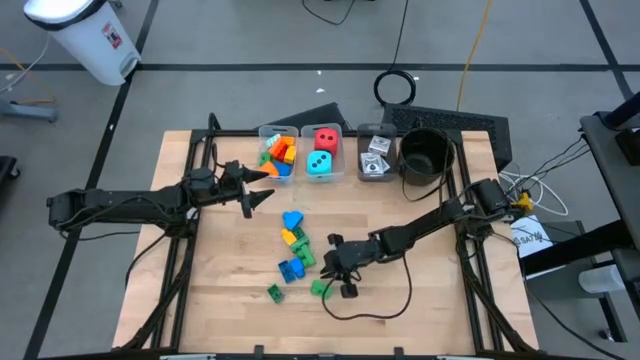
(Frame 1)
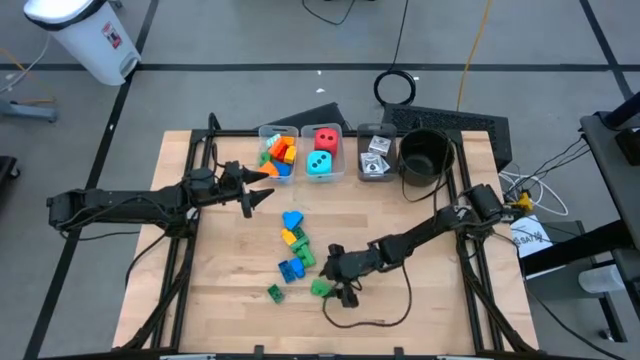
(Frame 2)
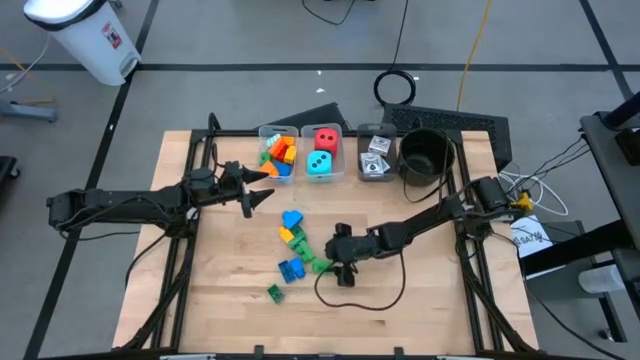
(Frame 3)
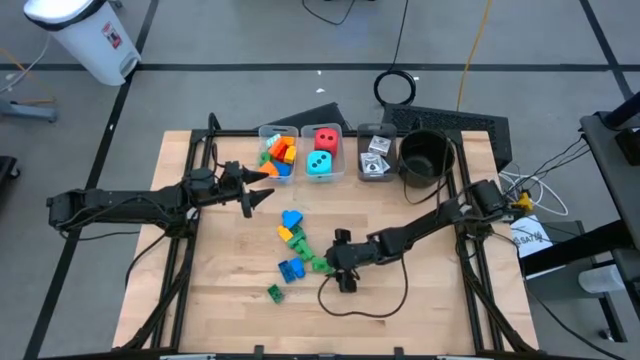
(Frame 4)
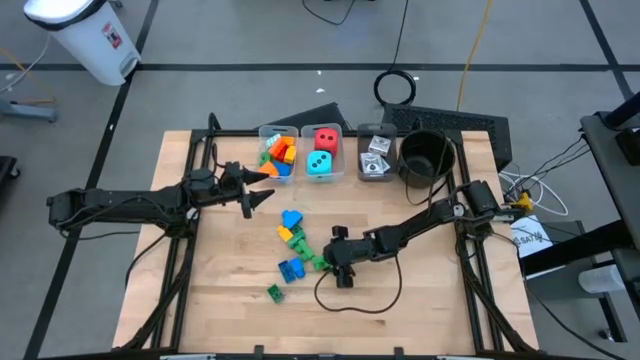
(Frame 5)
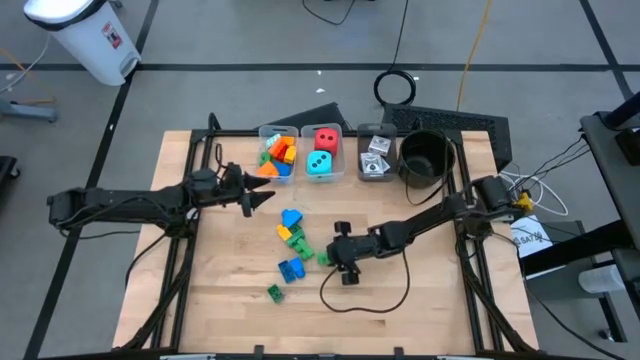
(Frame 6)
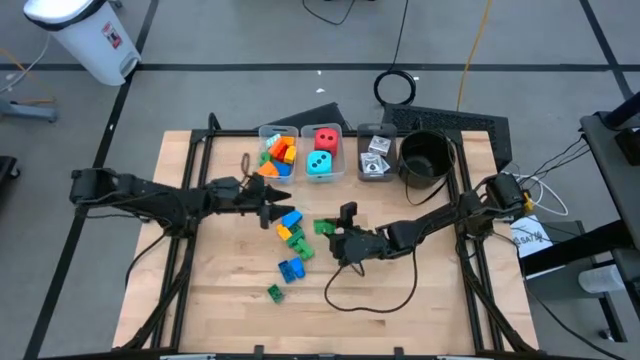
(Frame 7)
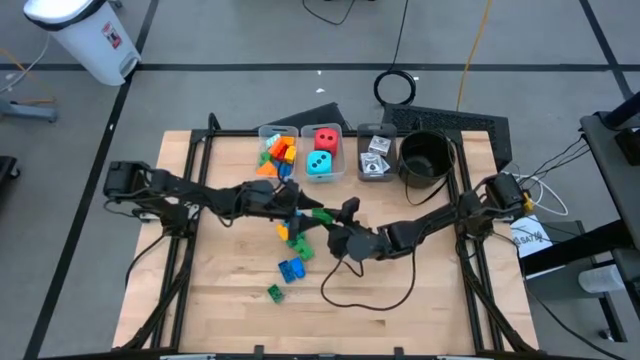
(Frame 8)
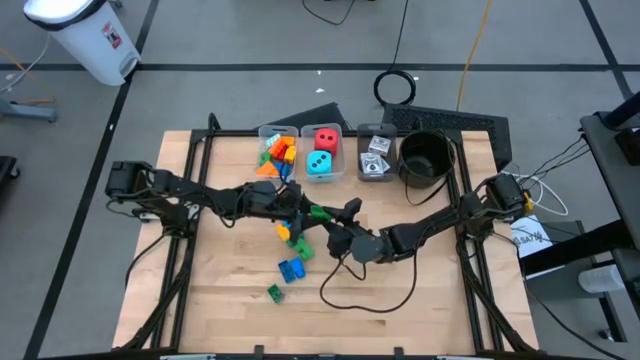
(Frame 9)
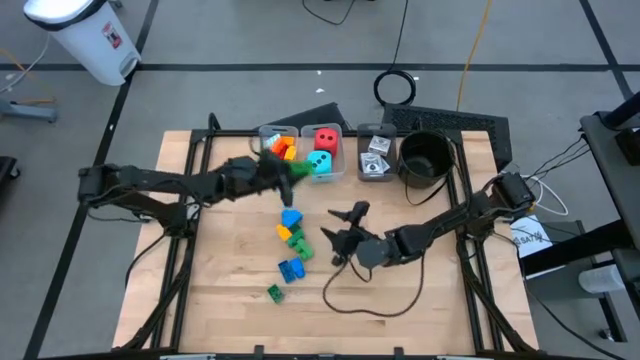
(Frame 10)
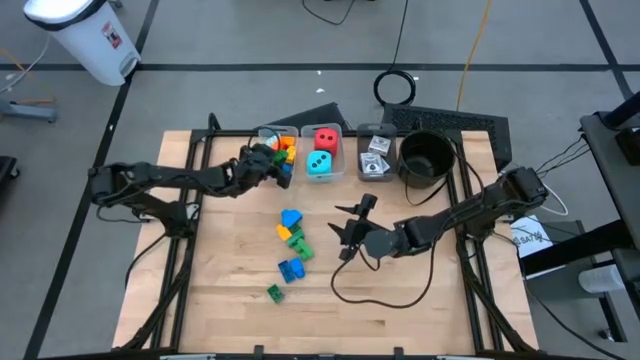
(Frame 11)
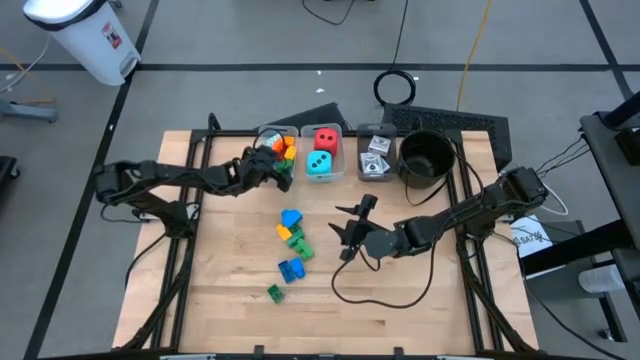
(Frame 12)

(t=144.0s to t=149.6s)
Task: Pick & Place Toys
Put the green game piece into the left transparent bin

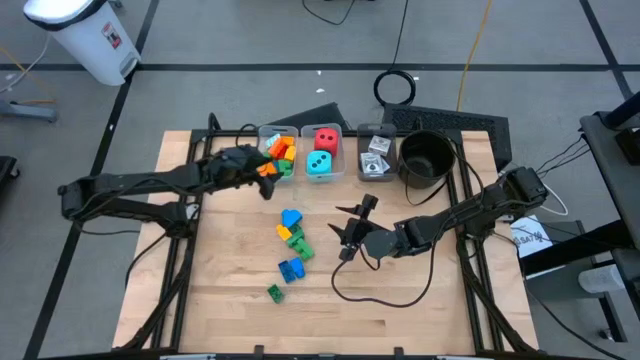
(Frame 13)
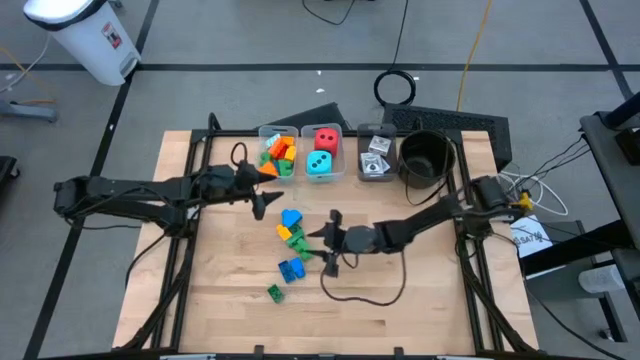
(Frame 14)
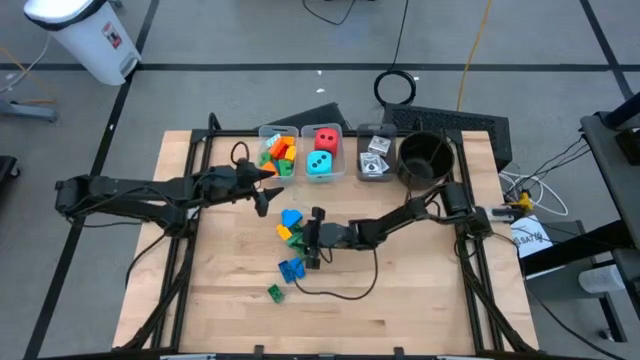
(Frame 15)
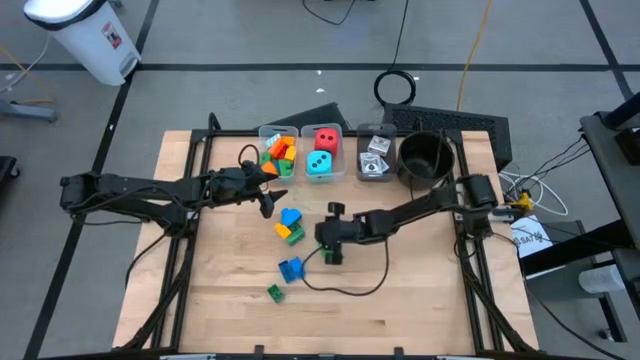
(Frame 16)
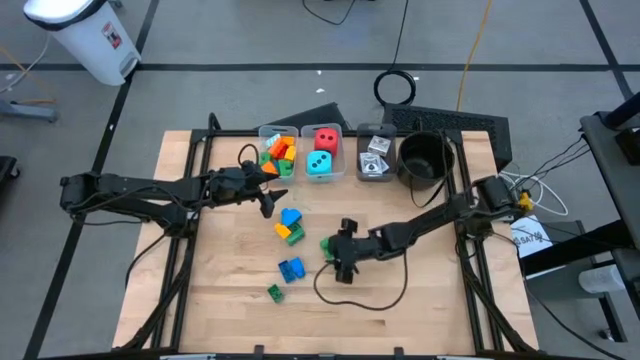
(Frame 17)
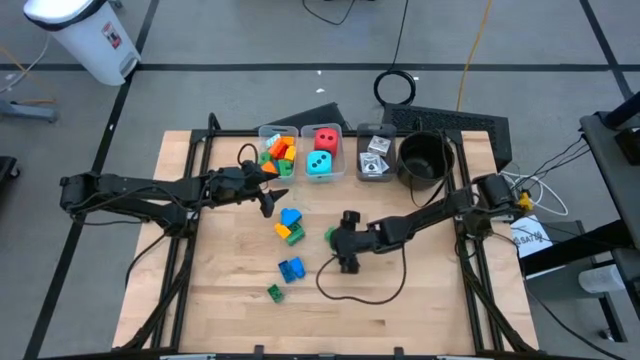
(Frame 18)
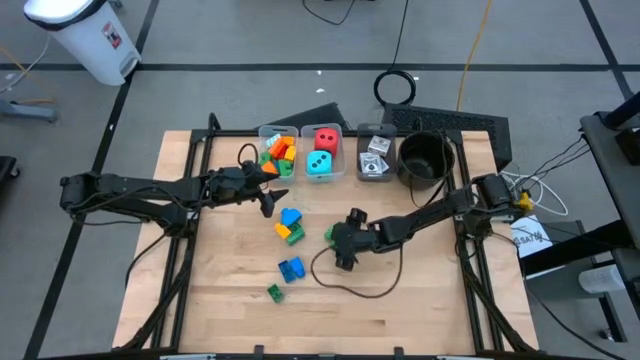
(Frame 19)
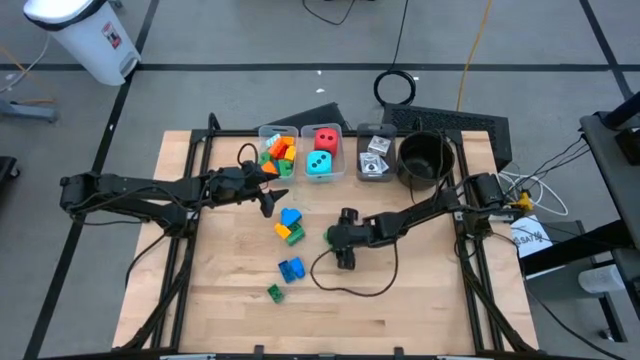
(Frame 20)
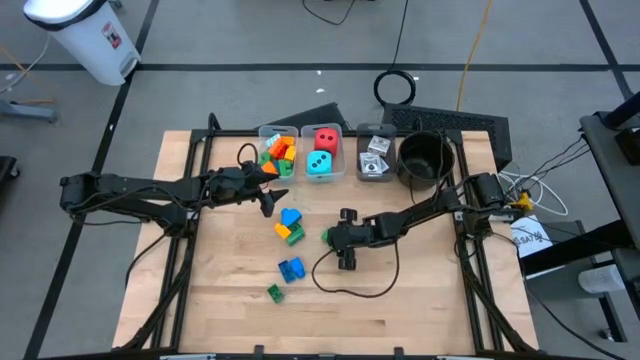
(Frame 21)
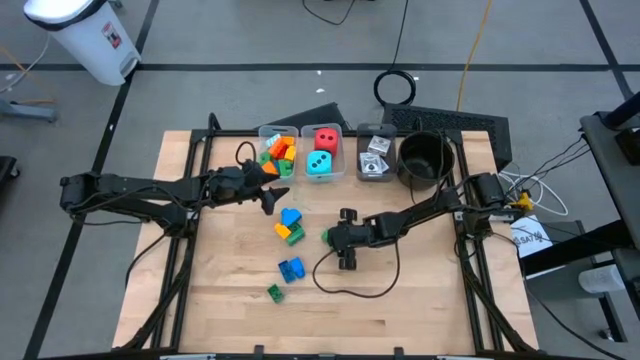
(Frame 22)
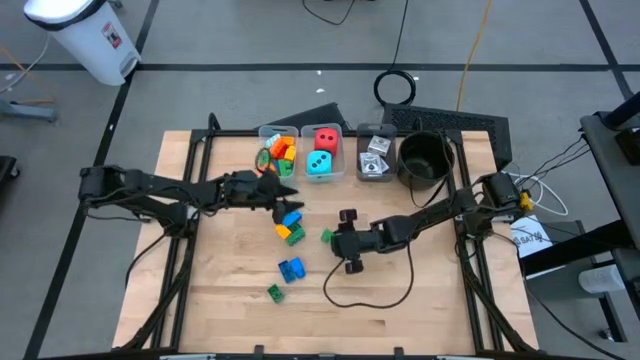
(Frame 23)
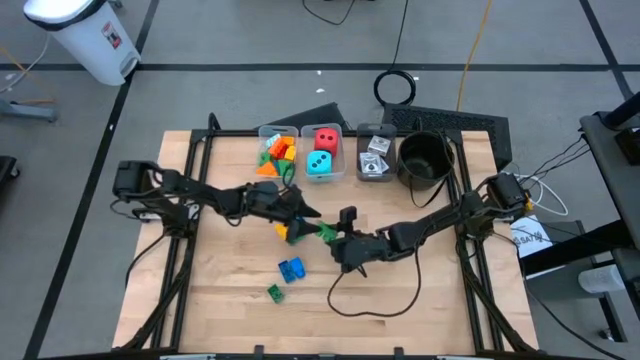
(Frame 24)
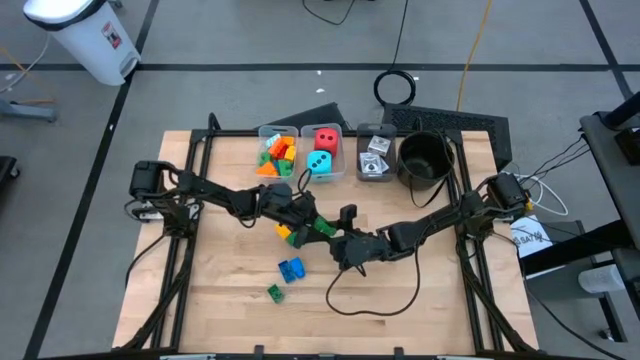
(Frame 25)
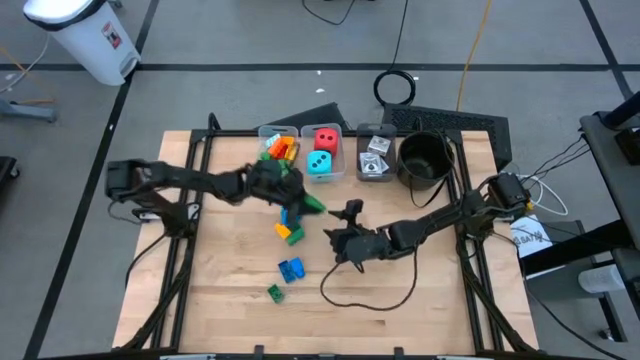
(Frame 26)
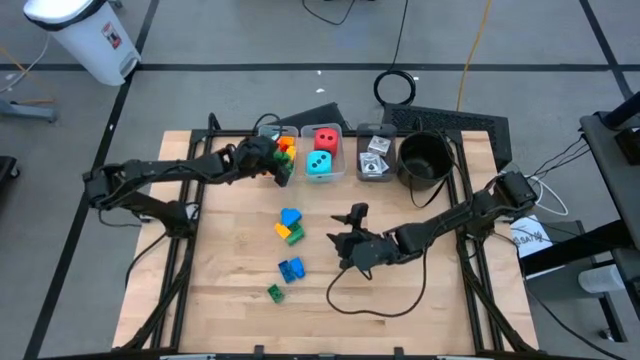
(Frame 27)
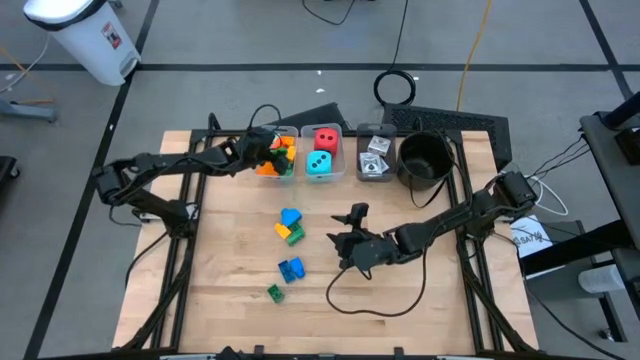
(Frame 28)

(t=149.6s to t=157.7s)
Put the green game piece into the left transparent bin

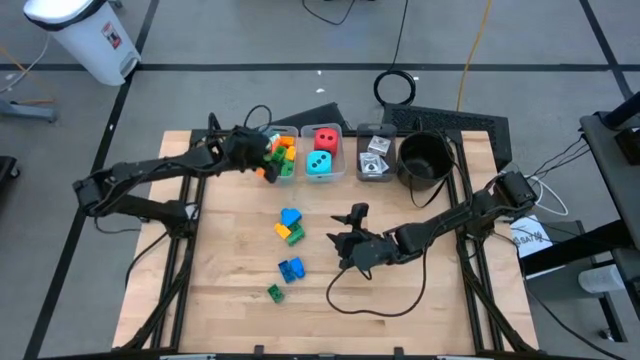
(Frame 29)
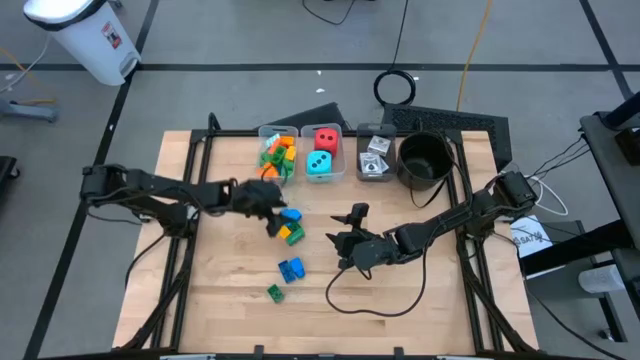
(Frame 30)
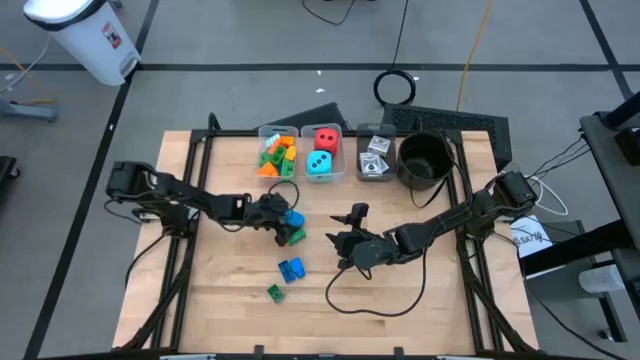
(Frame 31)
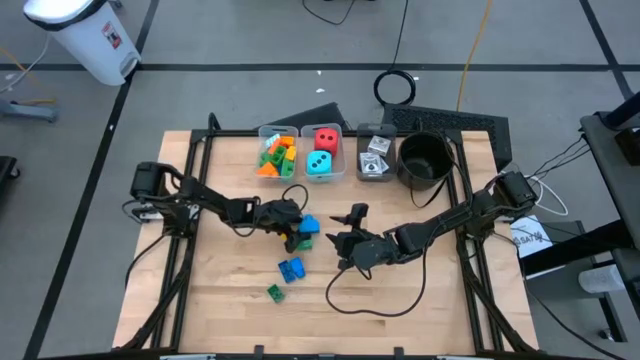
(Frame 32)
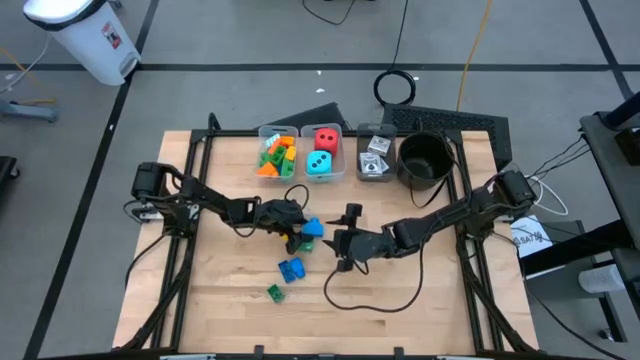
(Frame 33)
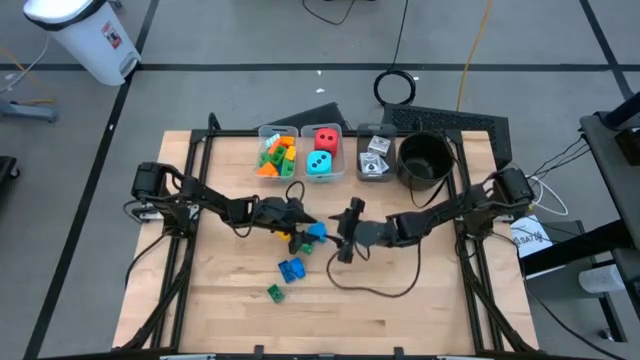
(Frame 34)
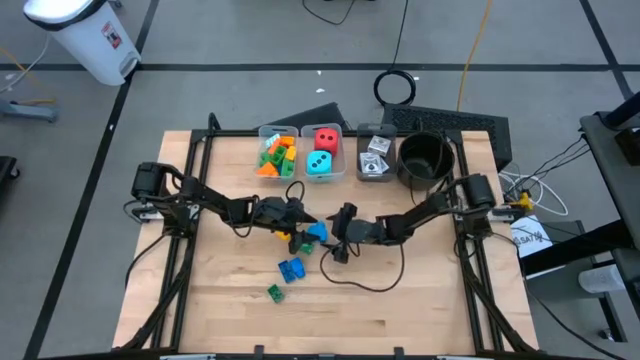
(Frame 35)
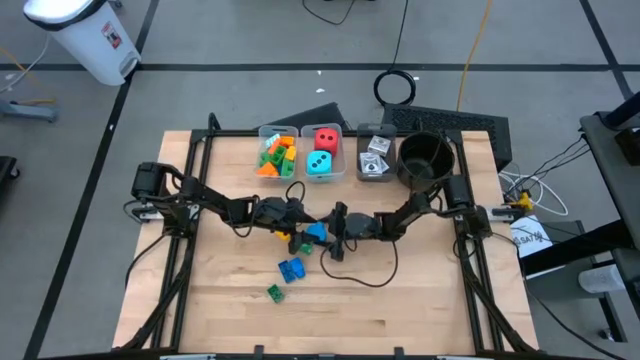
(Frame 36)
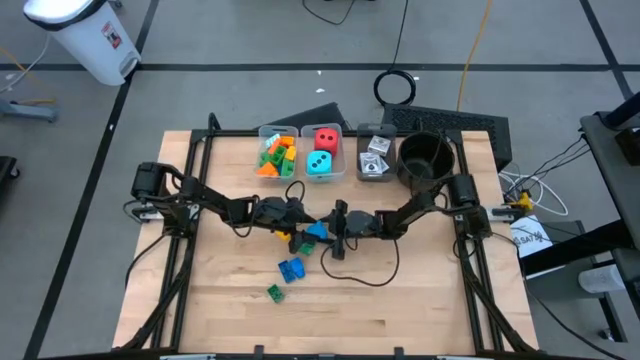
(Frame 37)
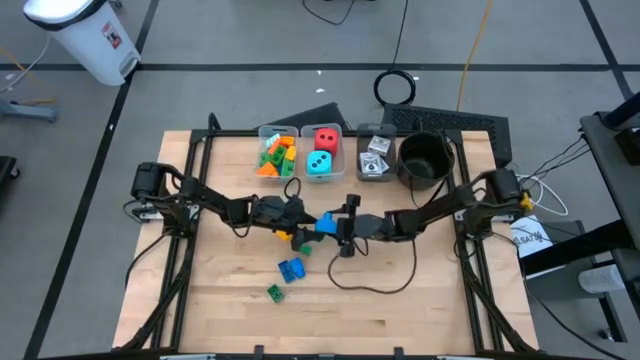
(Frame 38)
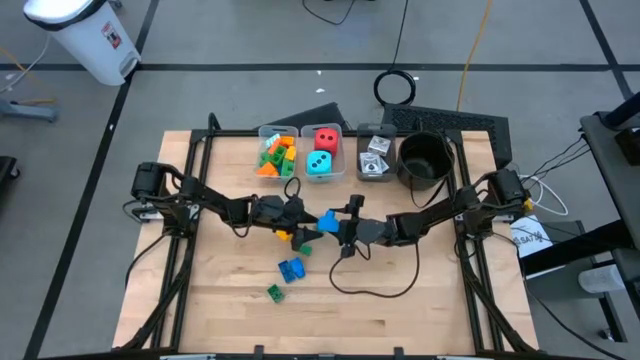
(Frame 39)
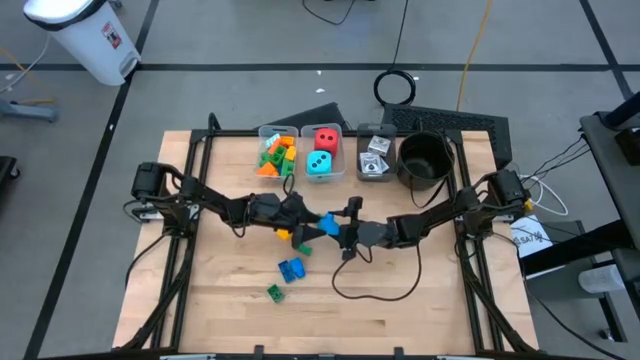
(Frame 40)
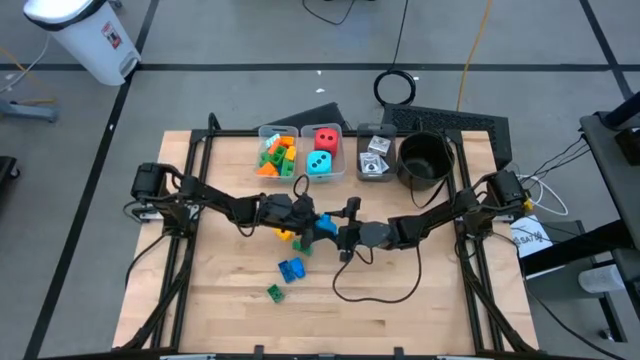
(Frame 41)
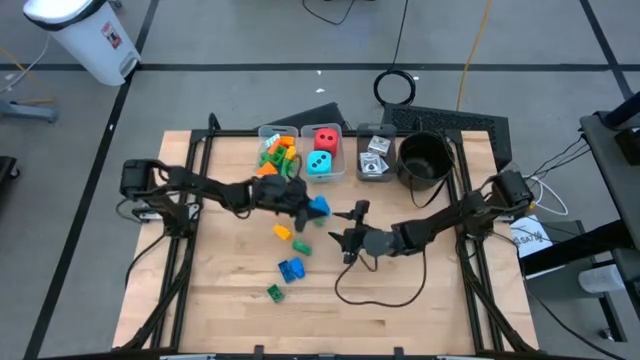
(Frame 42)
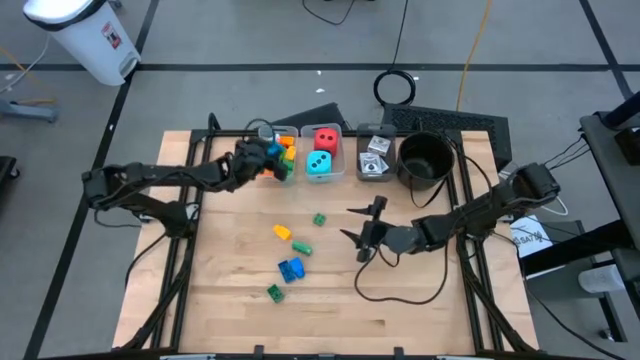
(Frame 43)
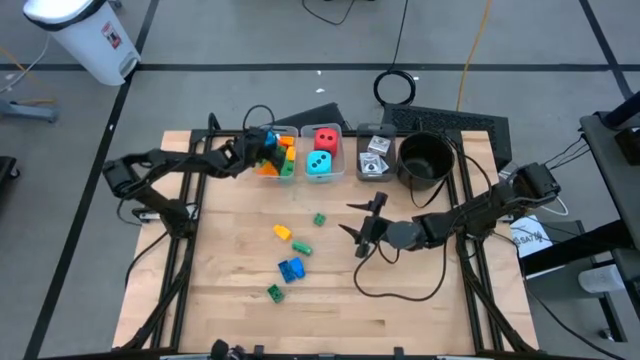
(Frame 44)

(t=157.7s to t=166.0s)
Put the blue game piece into the left transparent bin
